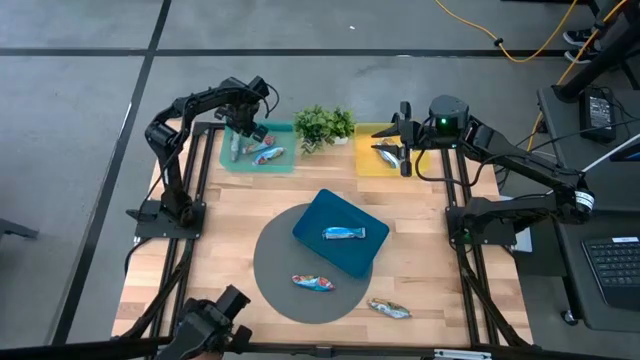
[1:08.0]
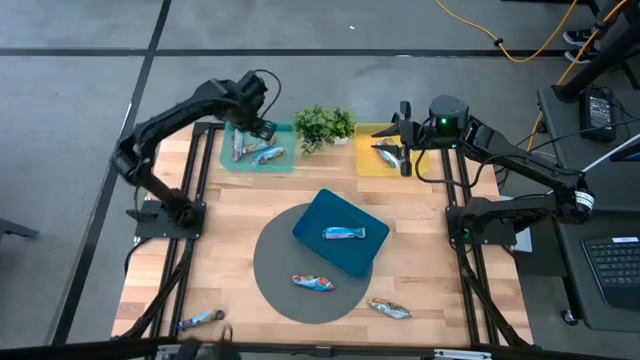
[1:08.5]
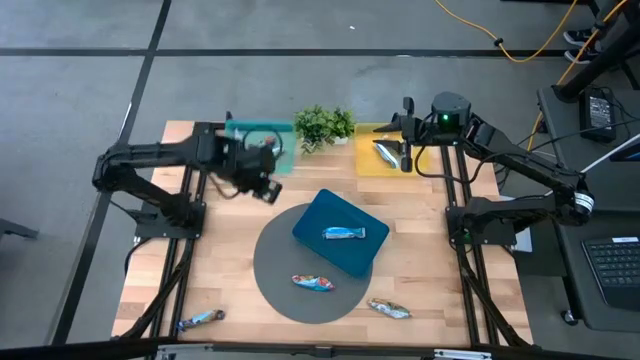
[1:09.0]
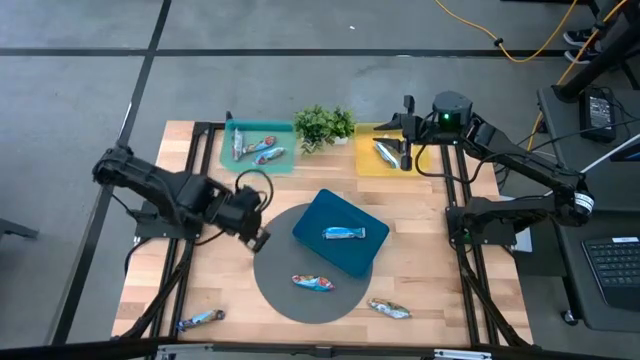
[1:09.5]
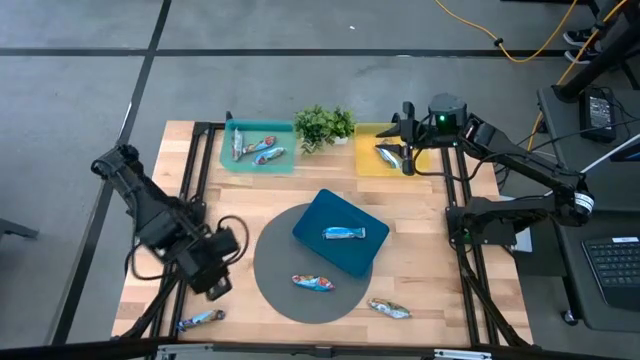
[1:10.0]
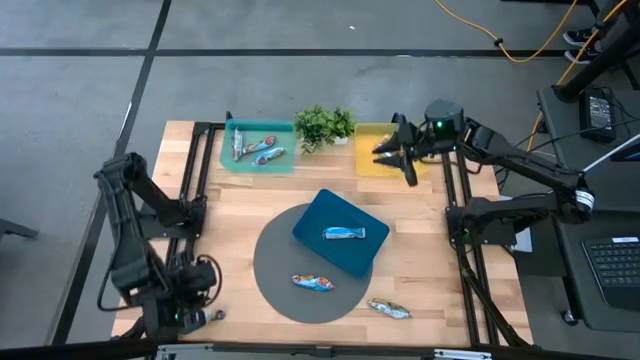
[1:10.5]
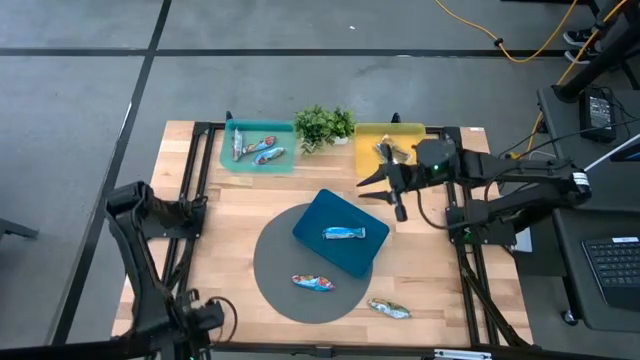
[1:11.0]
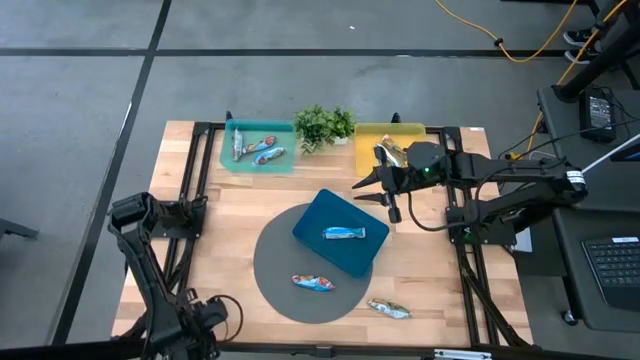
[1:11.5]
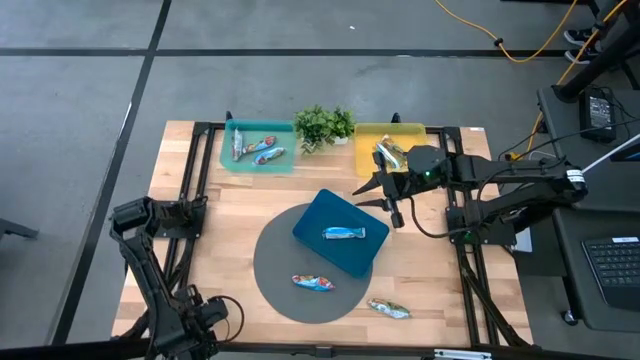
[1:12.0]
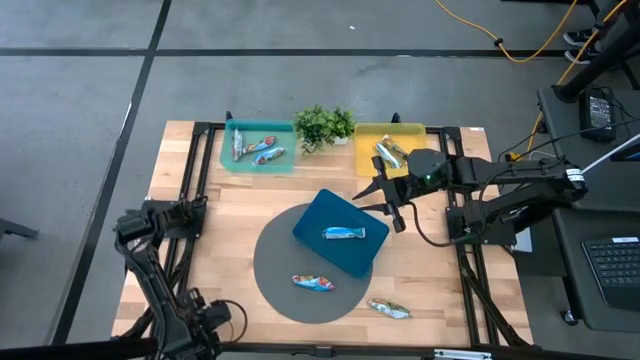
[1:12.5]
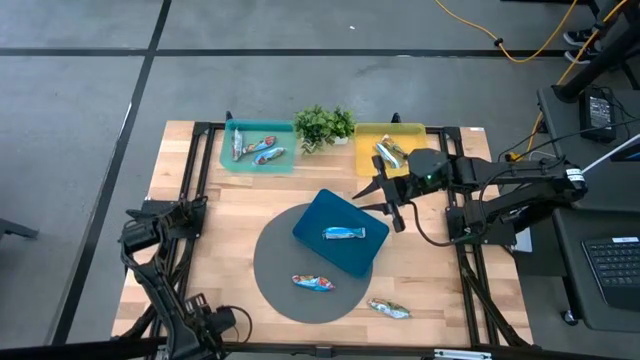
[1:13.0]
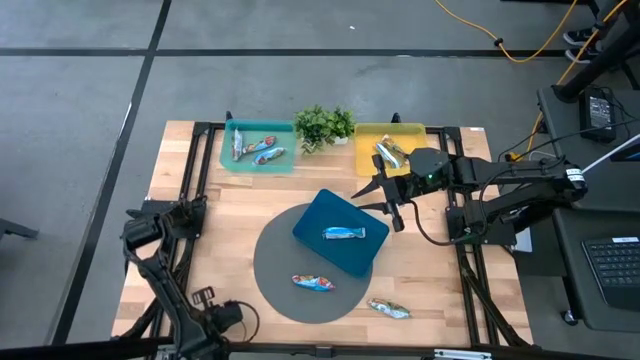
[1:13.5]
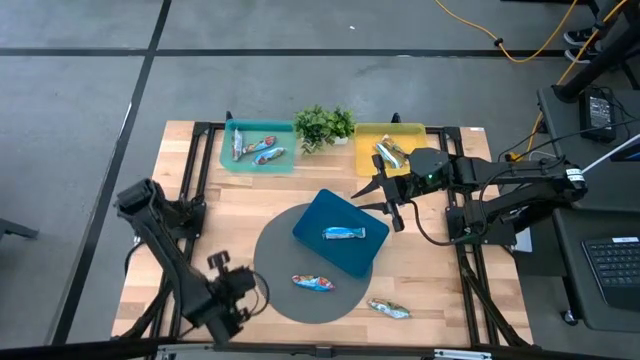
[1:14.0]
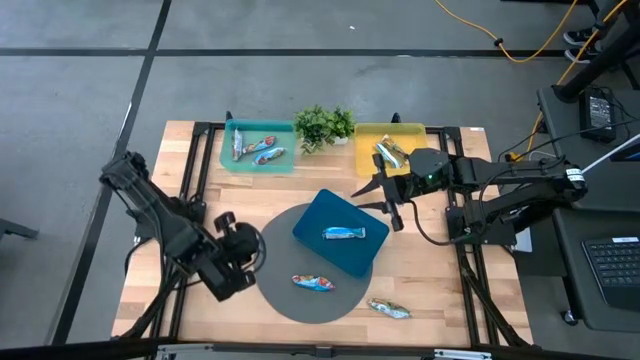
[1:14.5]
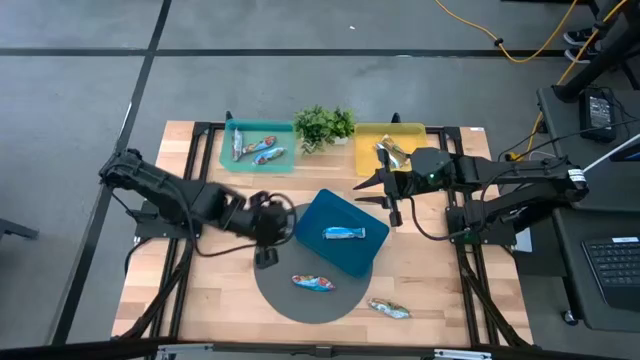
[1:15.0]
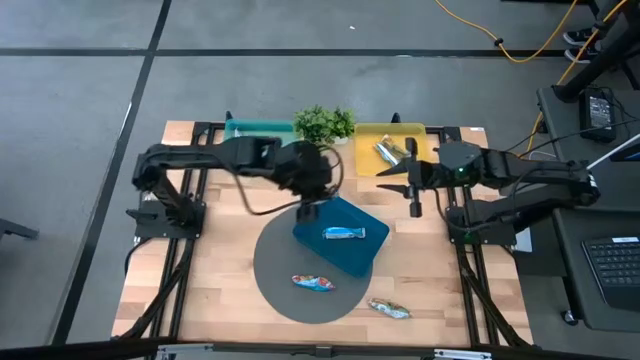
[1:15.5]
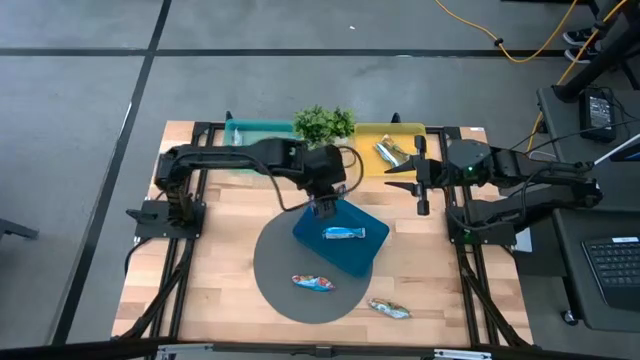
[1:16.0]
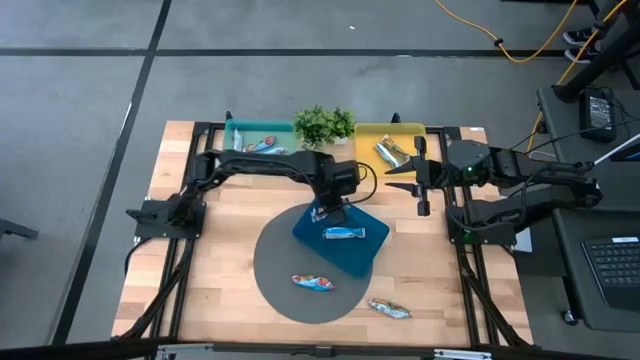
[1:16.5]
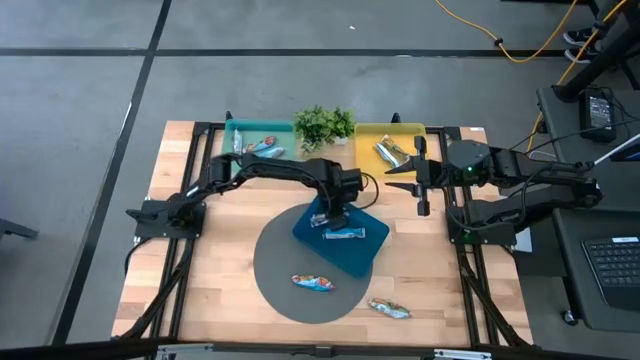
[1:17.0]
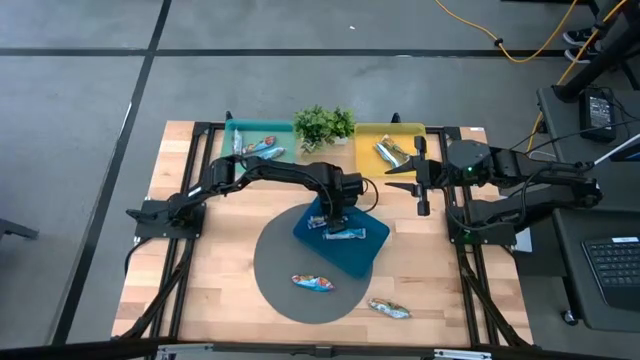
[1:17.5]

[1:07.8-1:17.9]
Task: Pick and place Granola Bars by type
Put the blue granola bar into the blue bin

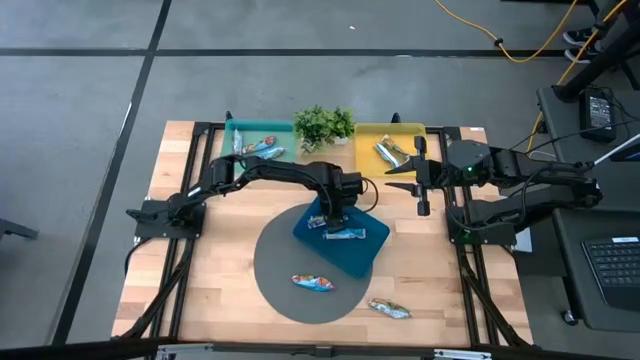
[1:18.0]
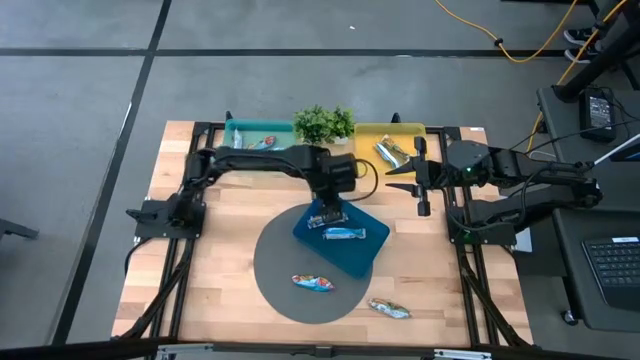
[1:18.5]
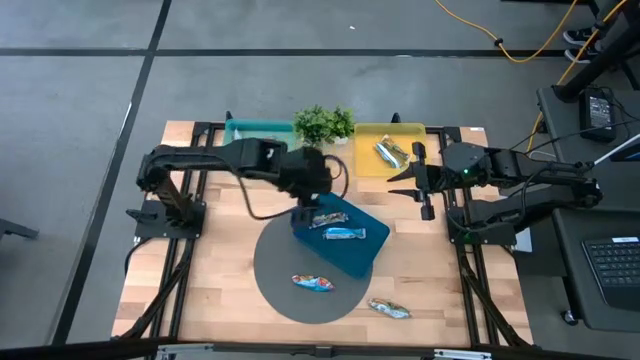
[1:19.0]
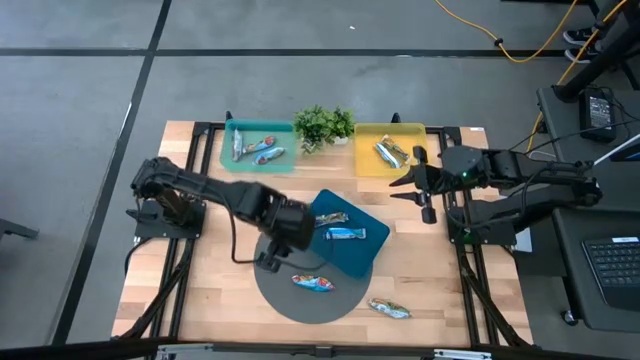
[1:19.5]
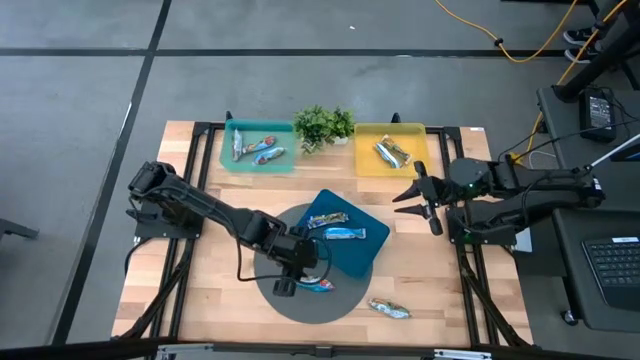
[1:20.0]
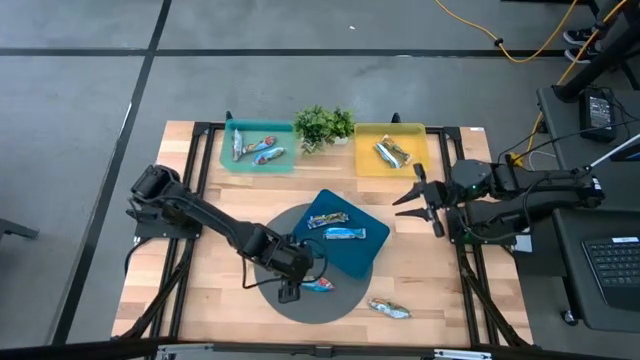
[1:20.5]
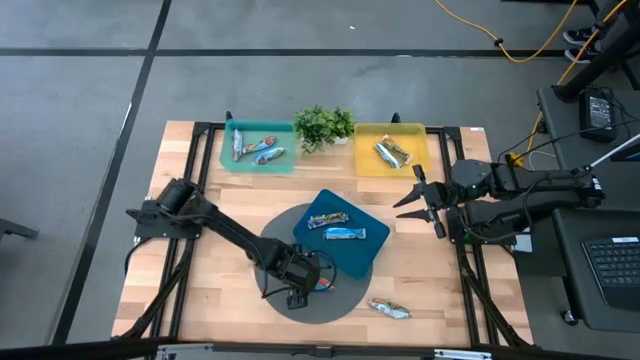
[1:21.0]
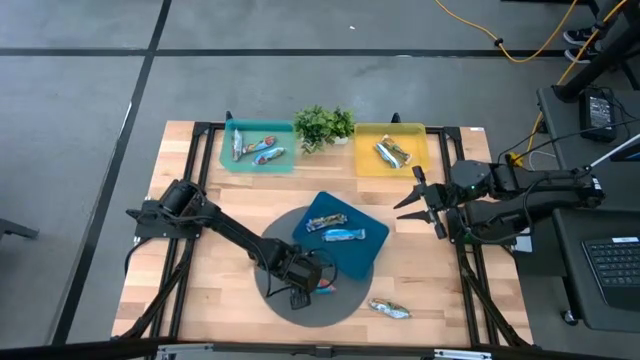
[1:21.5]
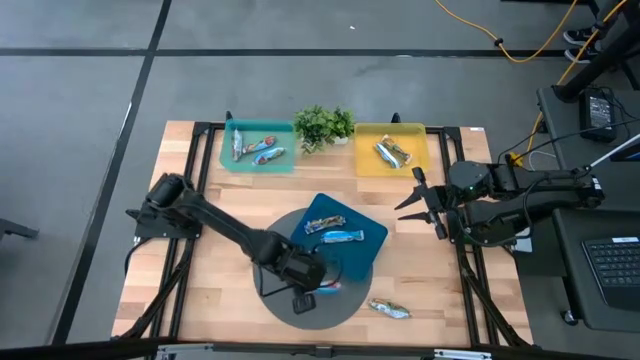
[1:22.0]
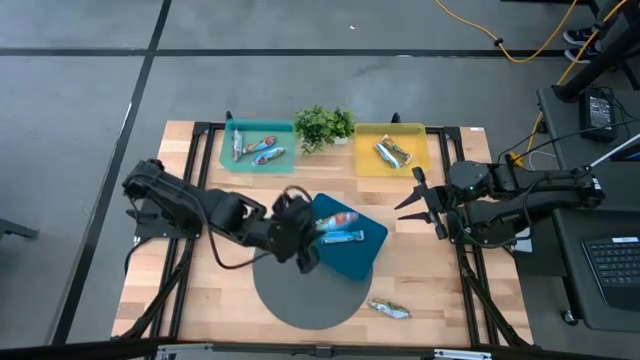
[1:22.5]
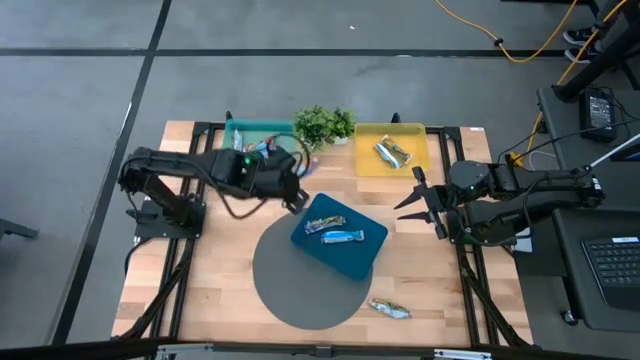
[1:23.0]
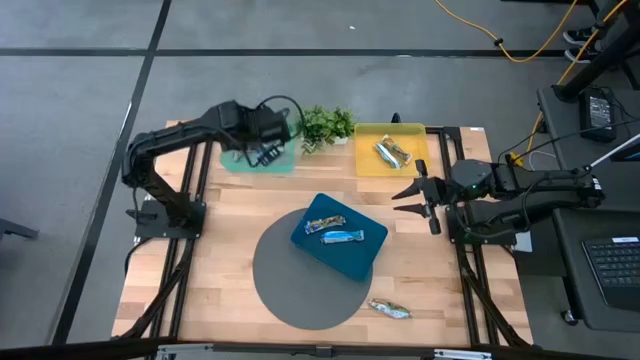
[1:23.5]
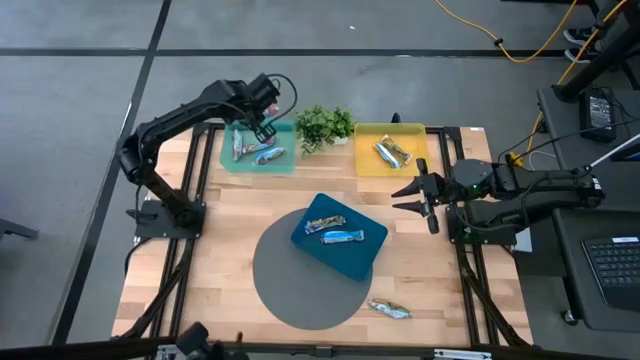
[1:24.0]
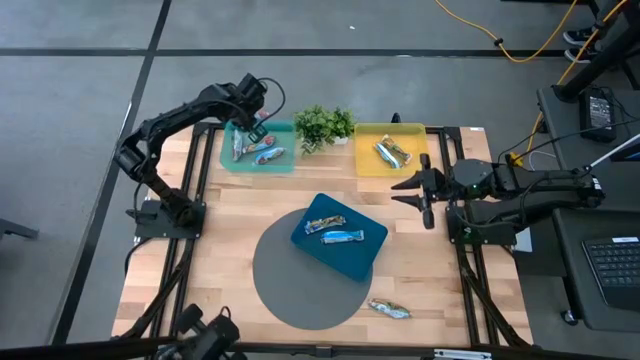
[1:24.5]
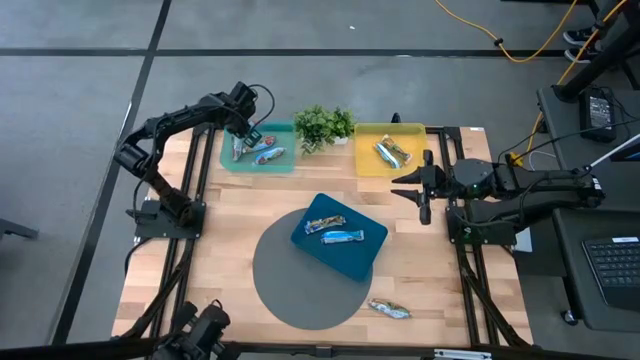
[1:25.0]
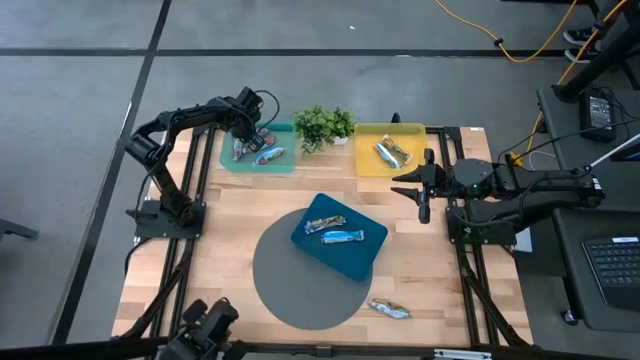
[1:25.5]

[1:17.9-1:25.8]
Put the red granola bar into the green bin

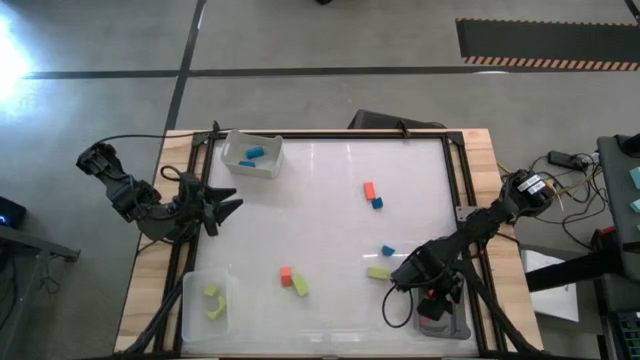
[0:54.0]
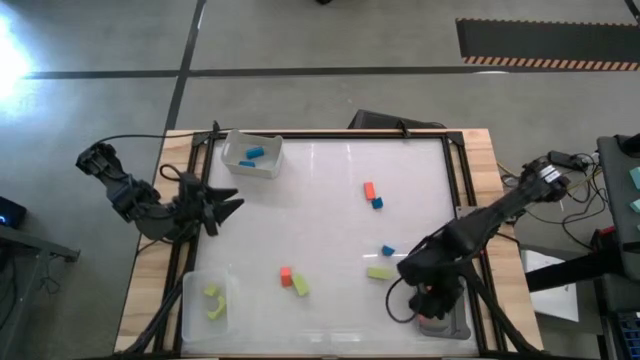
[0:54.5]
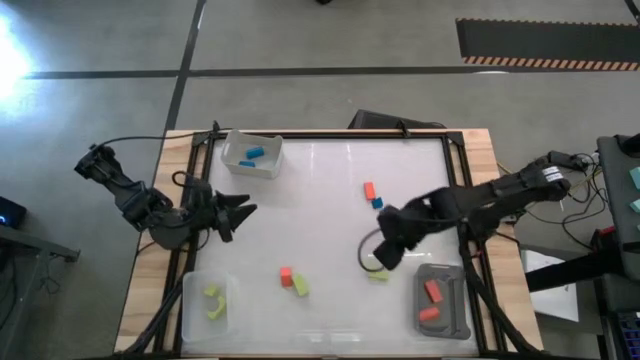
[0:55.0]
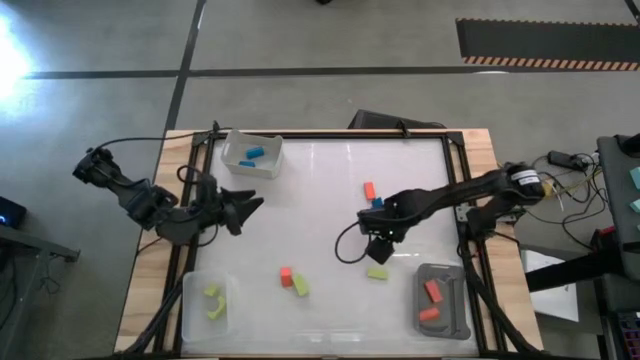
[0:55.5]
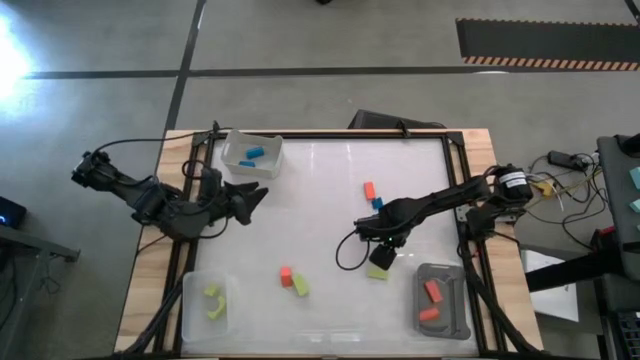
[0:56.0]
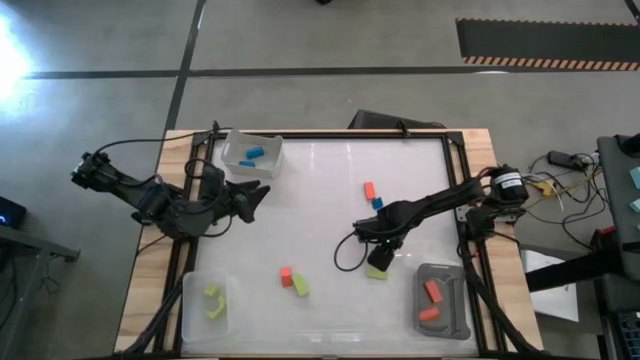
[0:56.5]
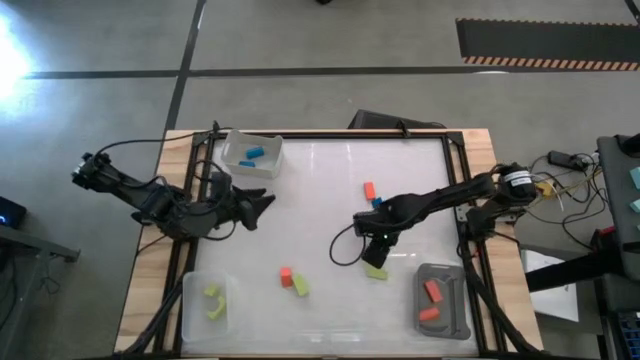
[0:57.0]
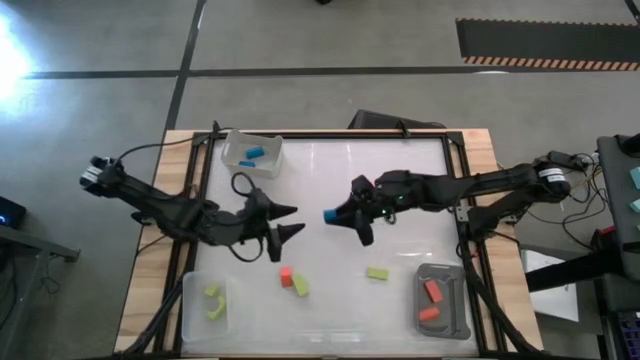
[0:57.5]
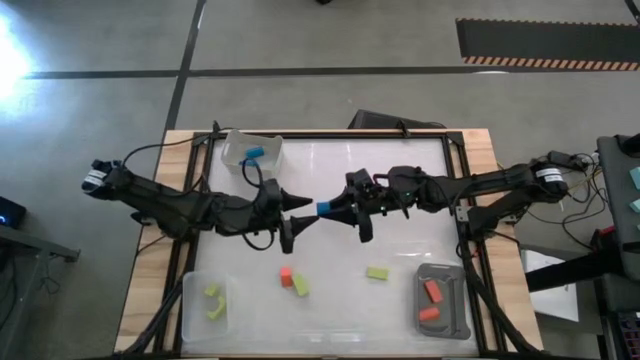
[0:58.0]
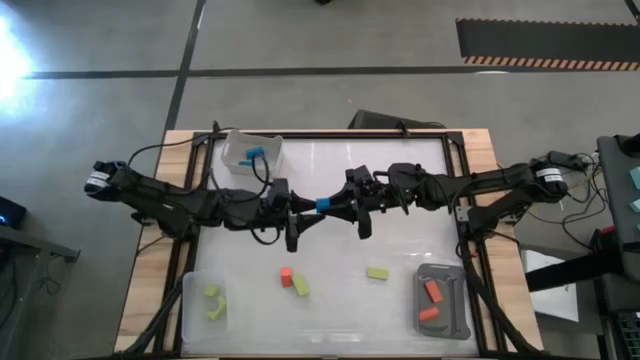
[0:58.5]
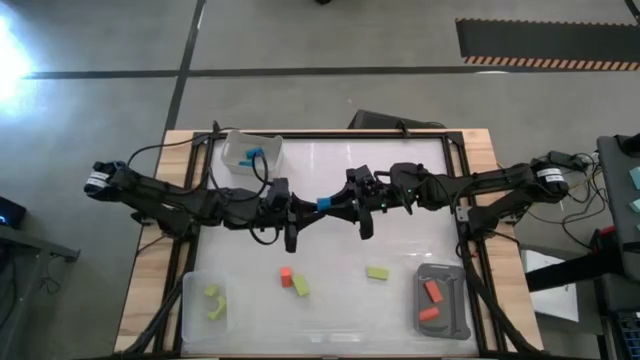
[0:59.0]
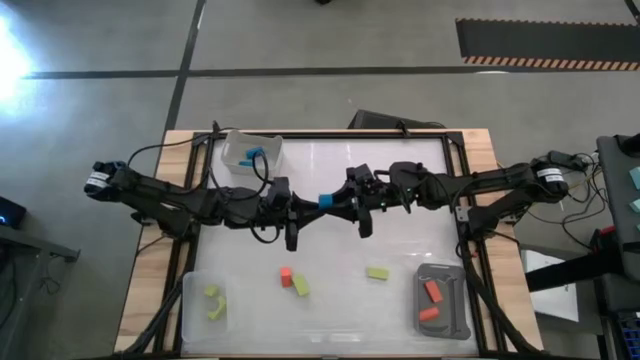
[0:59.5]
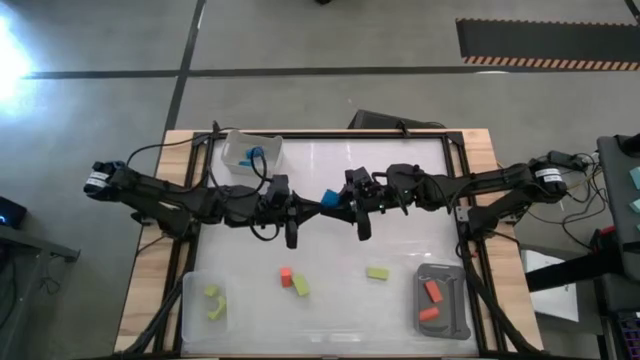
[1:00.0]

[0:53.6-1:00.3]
Task: Sort & place blocks by color
Put the blue block into the white bin
